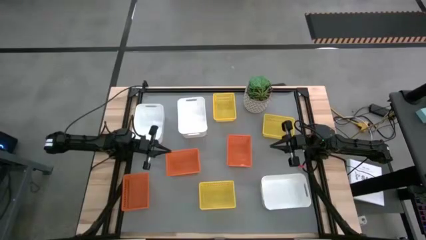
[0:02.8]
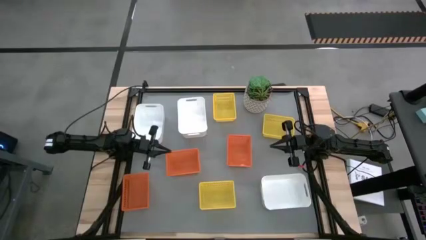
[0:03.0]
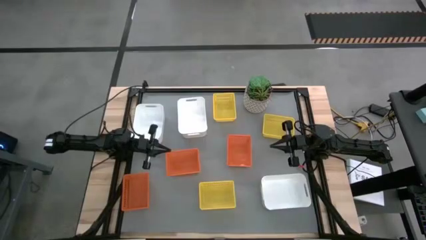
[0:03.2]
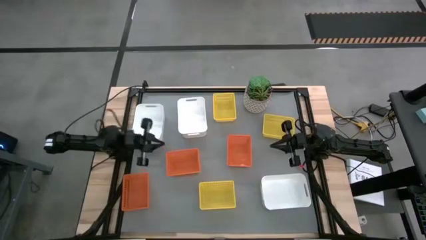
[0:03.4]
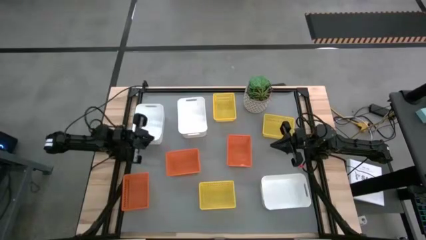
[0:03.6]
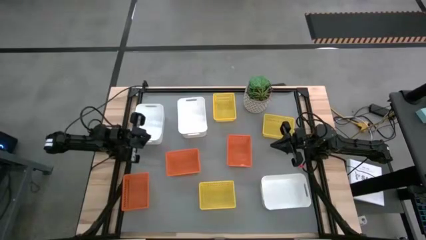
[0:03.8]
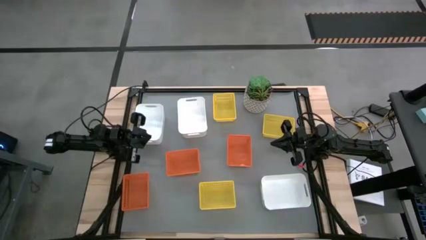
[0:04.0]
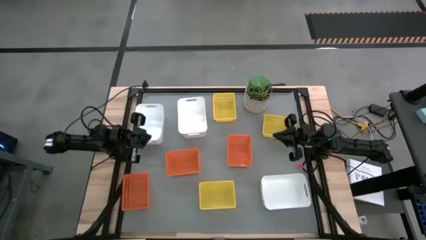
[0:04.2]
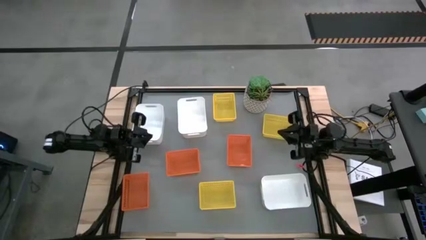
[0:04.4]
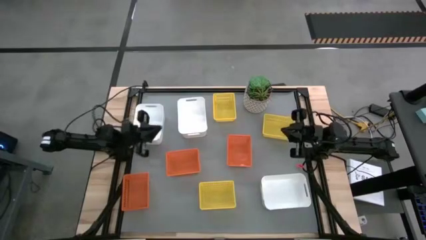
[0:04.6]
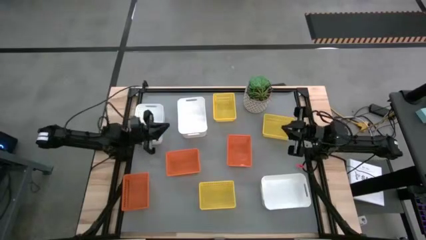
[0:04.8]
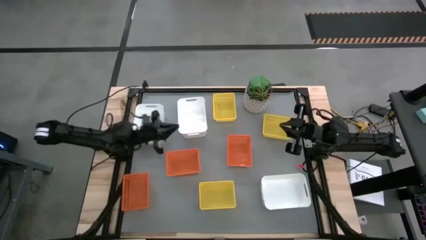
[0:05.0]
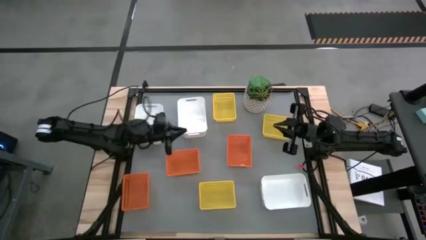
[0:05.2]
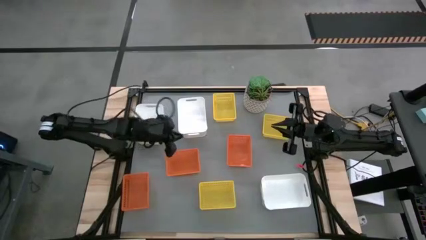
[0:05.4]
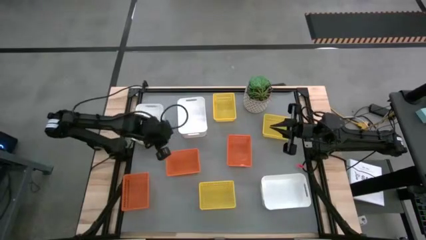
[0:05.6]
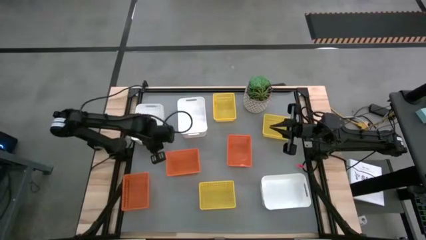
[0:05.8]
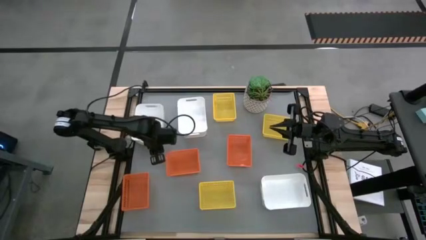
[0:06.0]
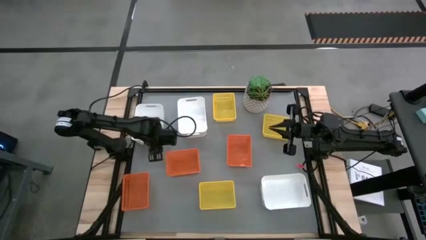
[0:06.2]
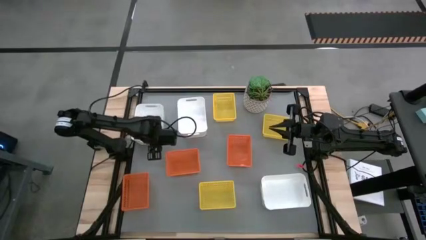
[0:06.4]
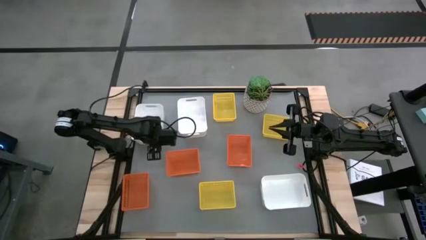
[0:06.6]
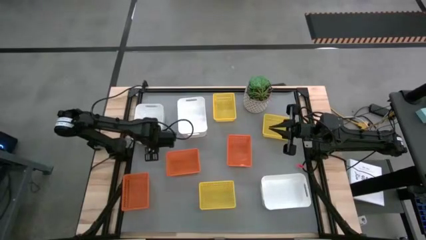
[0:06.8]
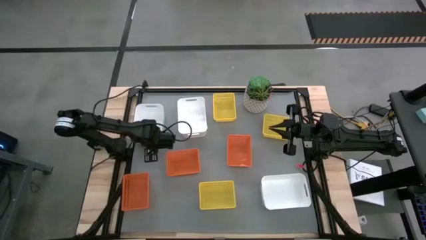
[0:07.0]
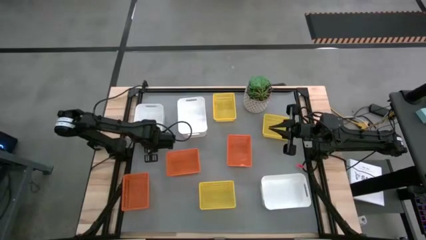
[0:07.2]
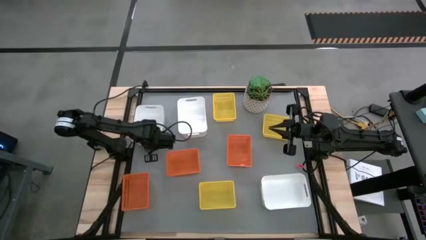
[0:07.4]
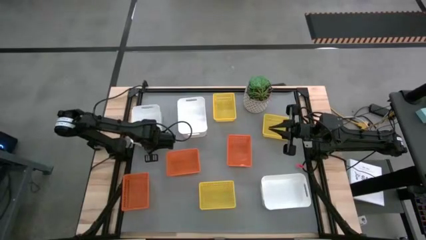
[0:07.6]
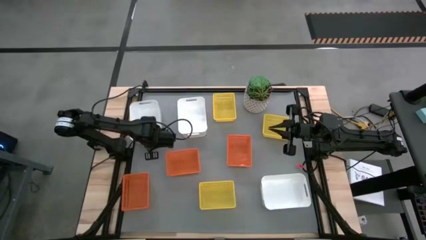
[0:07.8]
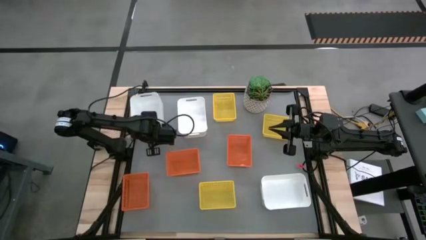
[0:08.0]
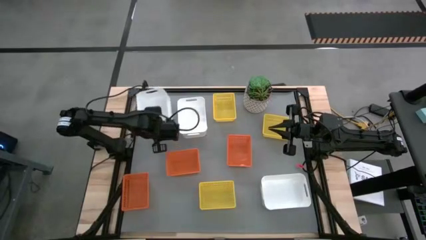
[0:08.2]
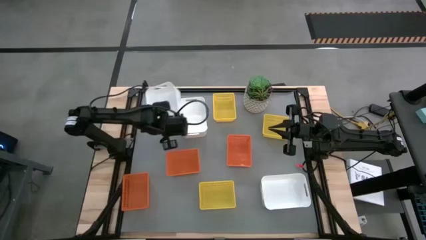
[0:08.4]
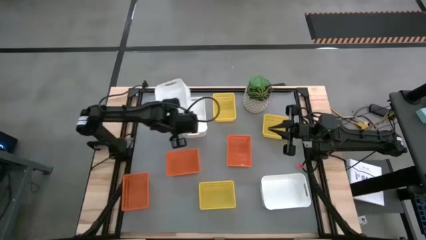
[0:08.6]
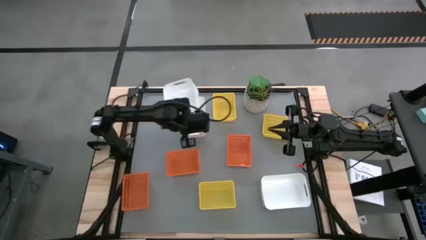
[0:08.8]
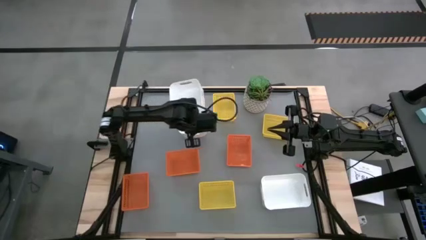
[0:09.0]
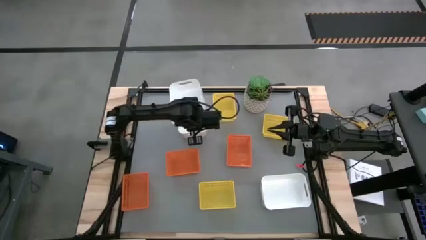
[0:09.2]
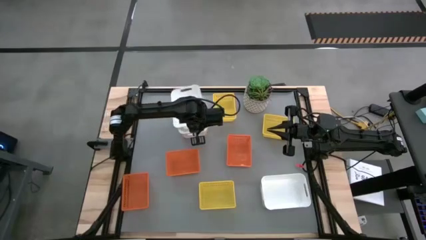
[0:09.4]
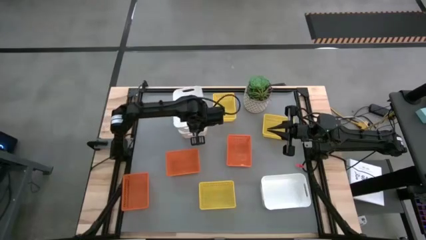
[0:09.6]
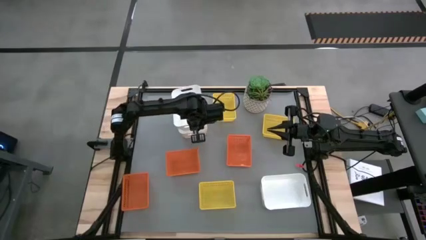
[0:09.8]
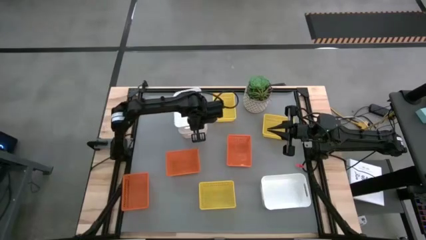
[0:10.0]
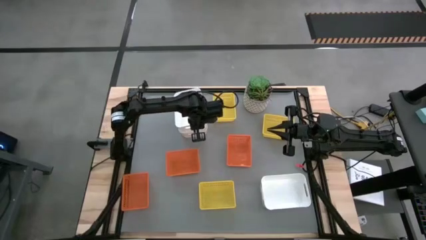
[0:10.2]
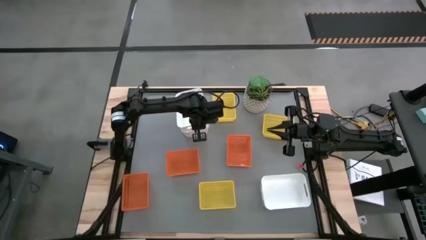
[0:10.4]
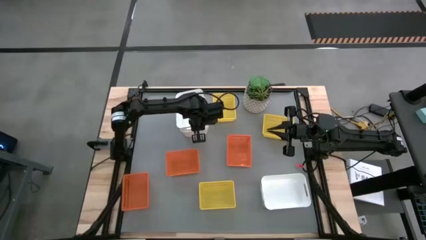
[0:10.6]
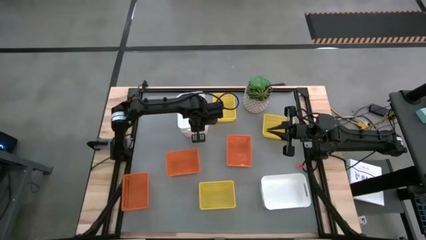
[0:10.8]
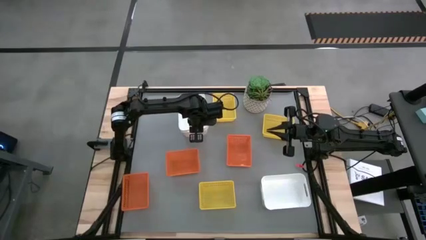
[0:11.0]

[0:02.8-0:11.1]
Stack the top left white bin on top of the top right white bin

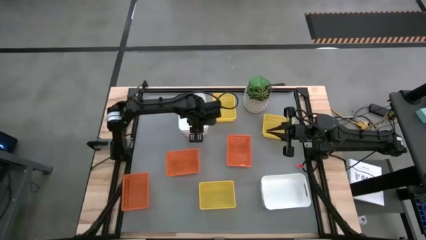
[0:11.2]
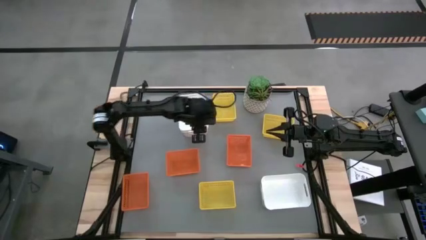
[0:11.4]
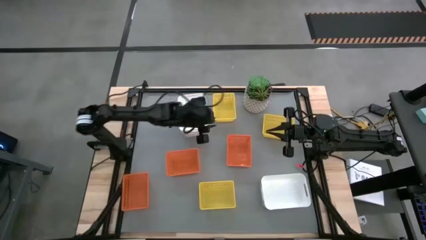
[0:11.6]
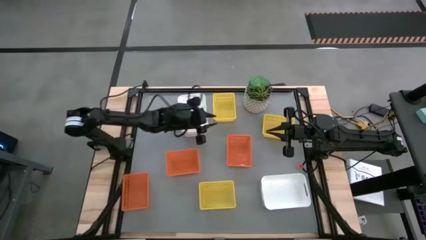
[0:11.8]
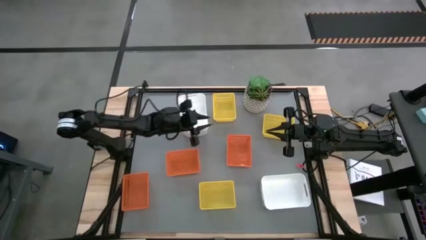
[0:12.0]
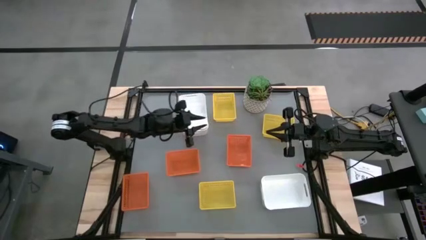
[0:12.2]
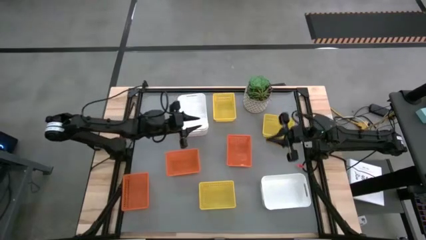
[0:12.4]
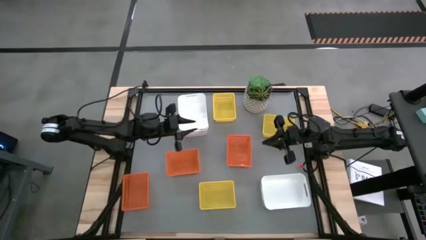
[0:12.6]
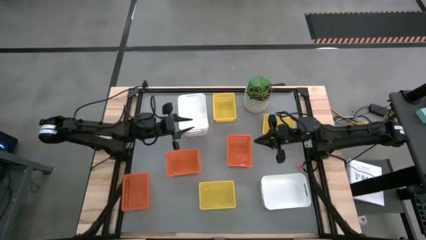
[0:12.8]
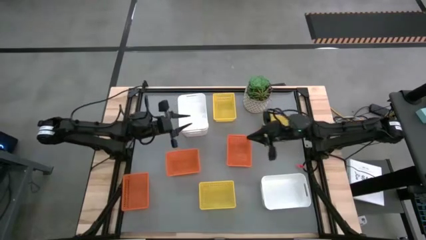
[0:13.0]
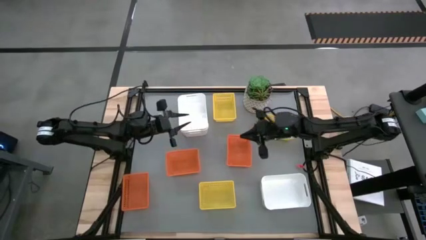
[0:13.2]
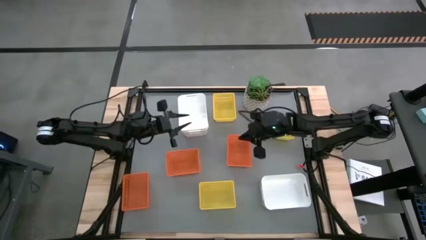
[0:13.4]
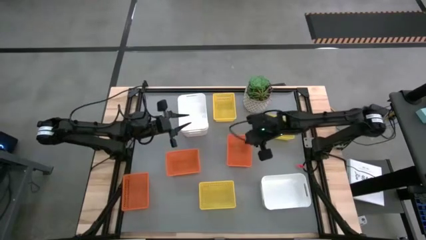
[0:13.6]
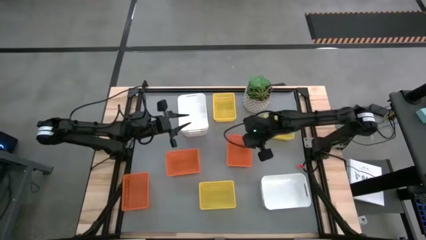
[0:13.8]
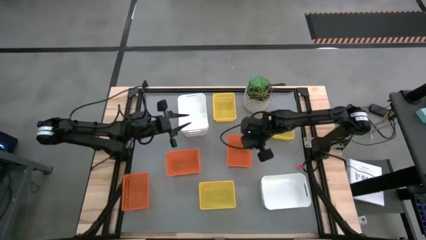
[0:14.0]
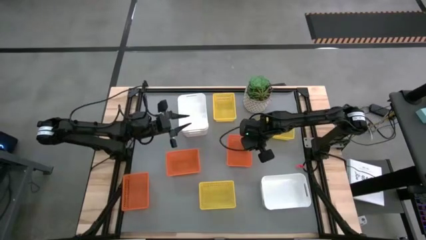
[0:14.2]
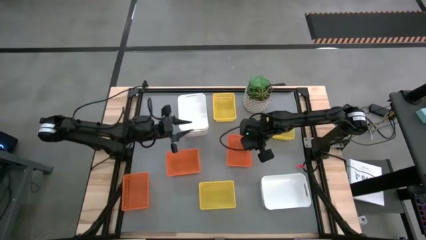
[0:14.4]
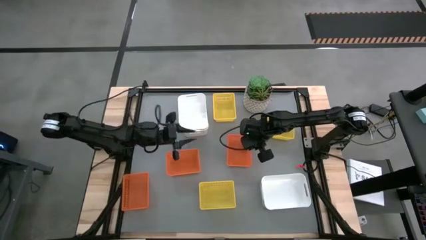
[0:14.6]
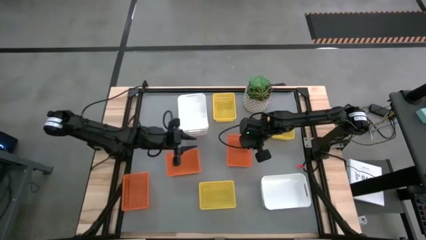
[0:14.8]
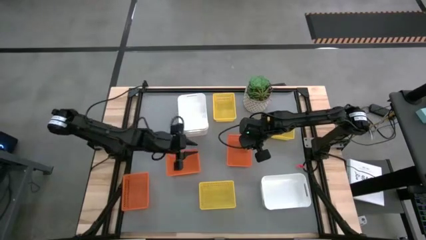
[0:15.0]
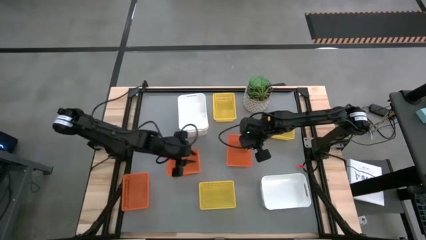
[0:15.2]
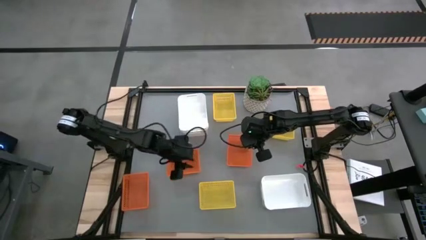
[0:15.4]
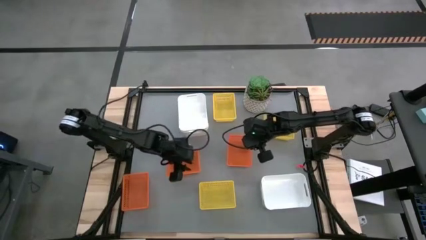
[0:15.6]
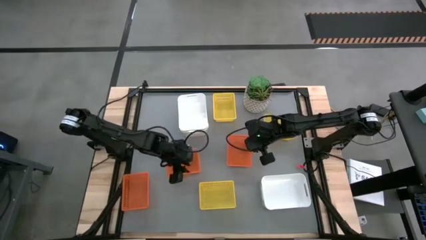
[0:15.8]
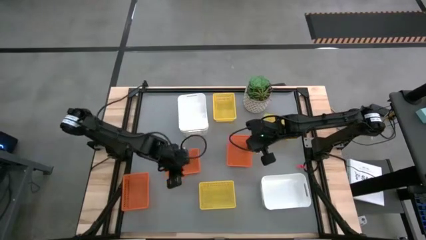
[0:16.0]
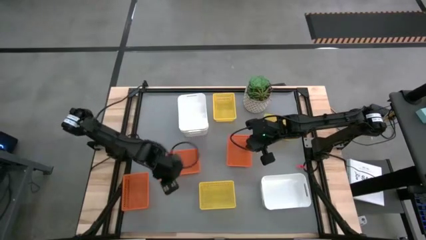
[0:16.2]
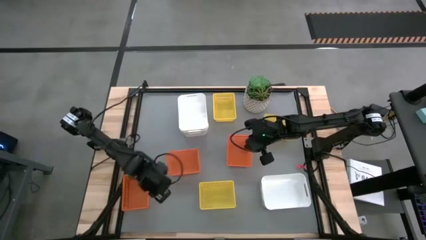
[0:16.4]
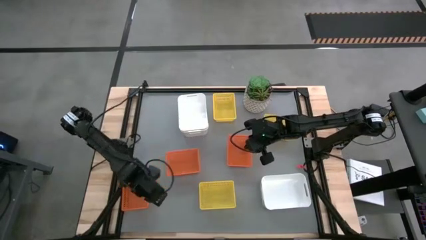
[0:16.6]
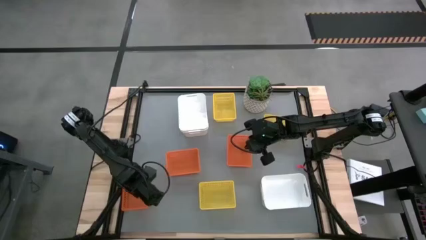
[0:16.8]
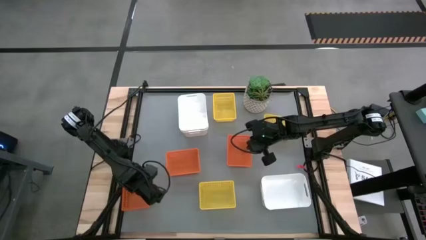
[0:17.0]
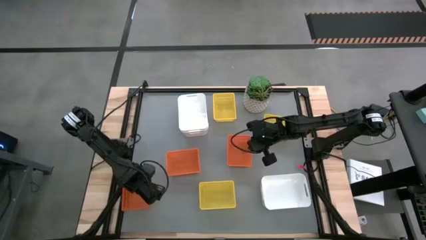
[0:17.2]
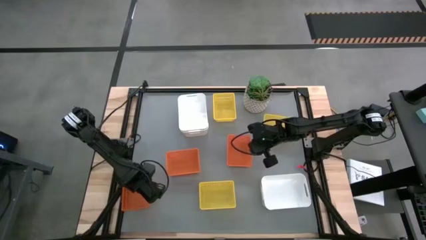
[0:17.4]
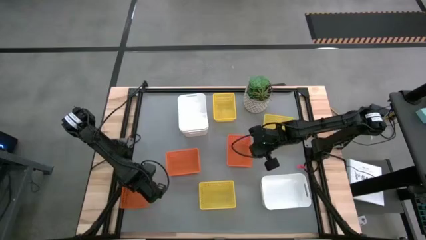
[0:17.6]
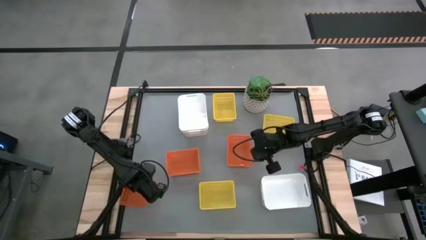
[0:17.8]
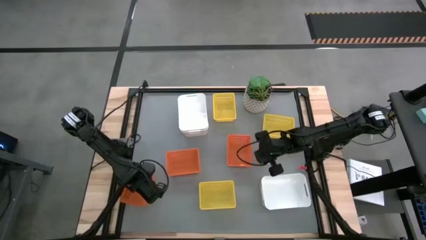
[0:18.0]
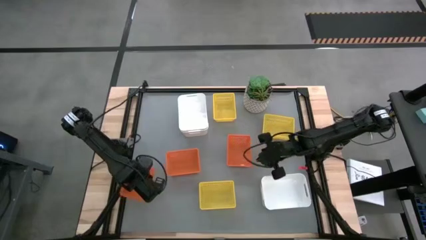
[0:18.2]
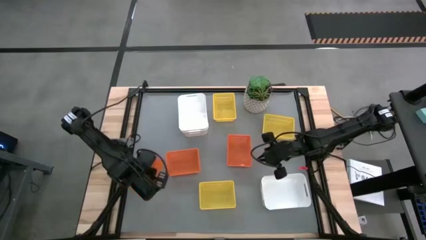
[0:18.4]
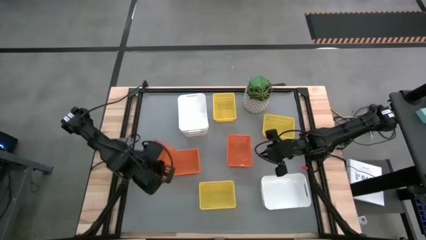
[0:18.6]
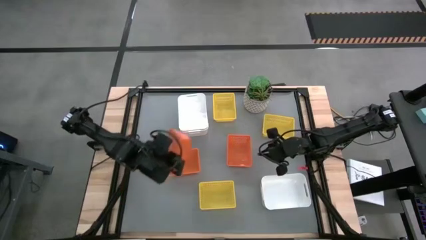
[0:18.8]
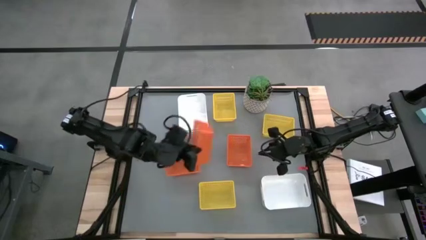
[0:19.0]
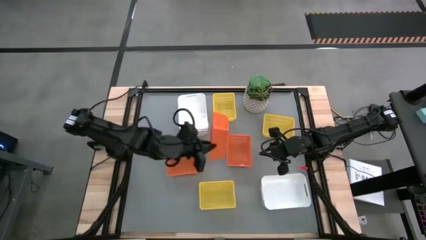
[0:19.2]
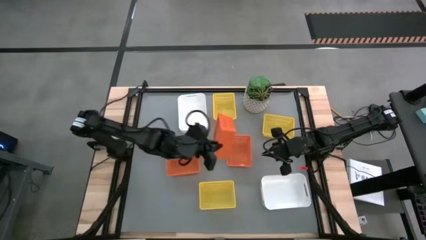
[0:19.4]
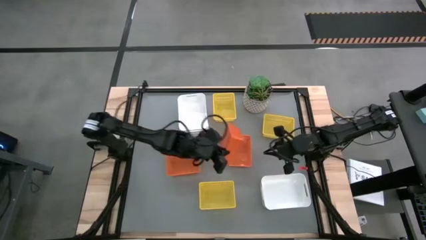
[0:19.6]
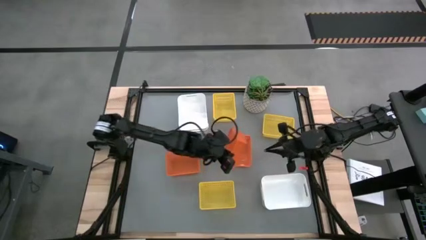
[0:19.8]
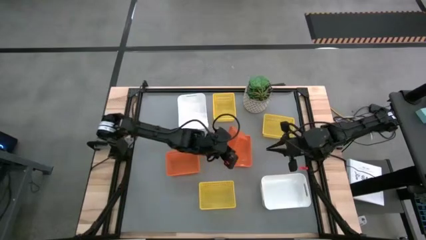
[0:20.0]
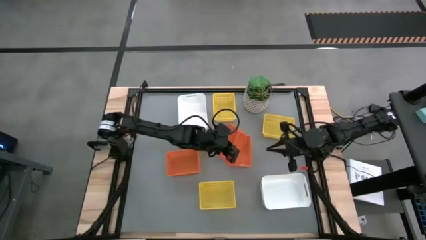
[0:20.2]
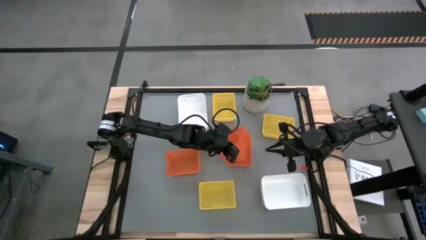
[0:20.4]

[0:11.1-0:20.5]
Stack the left orange bin on top of the right orange bin
